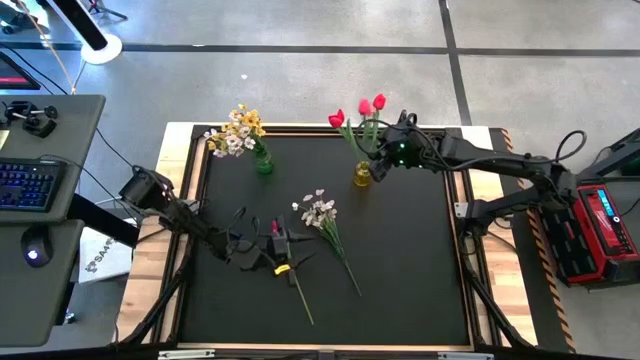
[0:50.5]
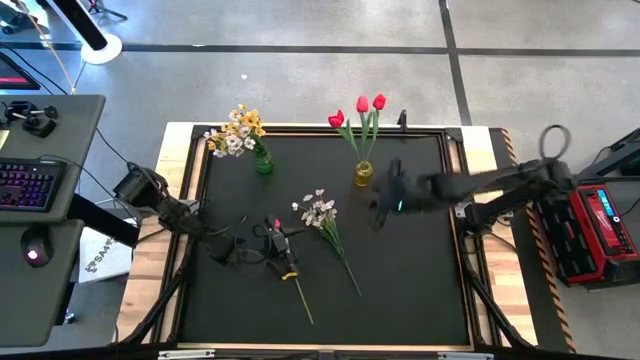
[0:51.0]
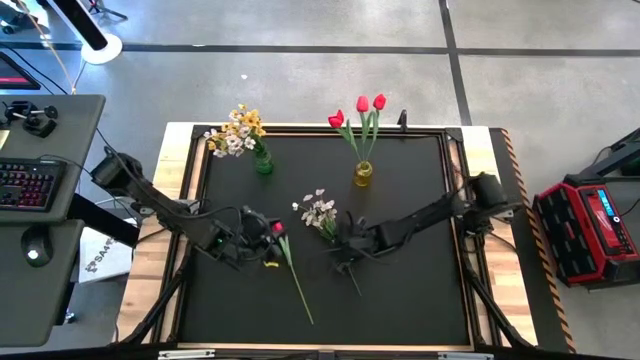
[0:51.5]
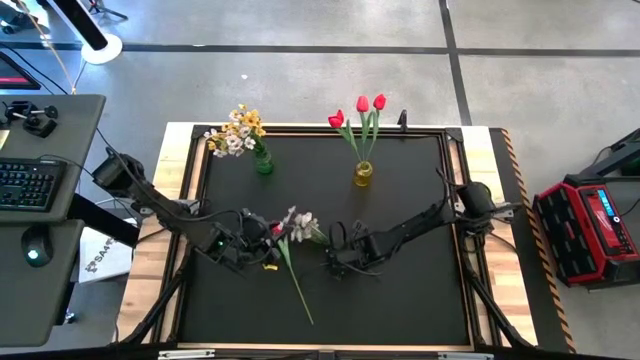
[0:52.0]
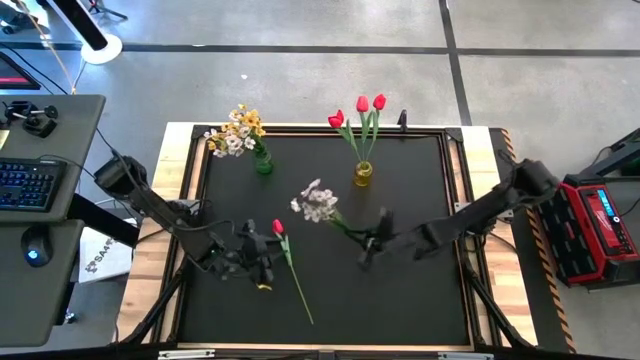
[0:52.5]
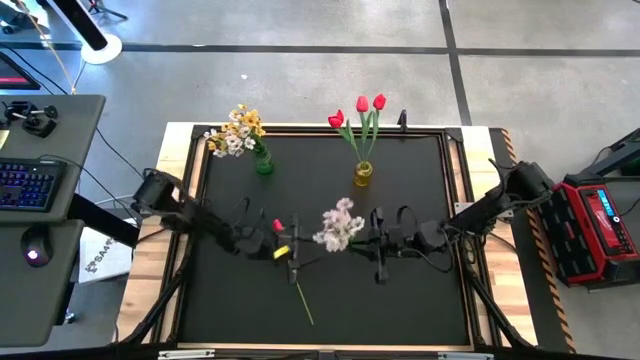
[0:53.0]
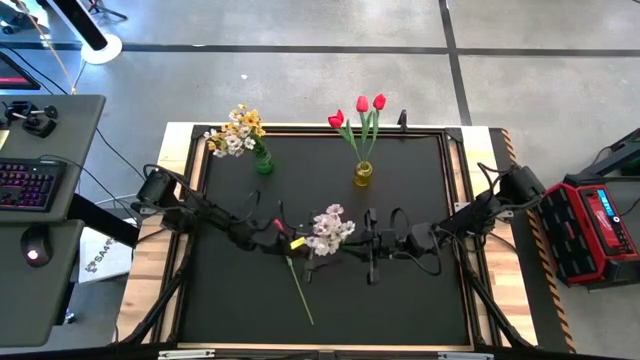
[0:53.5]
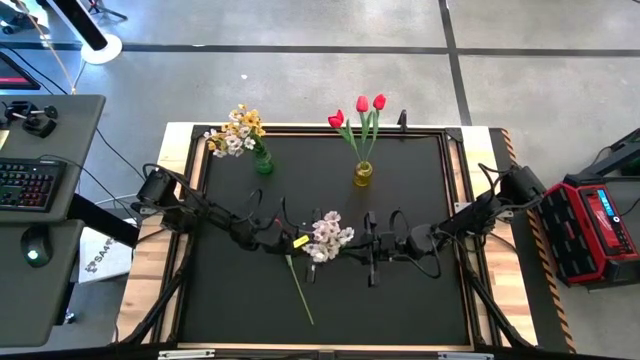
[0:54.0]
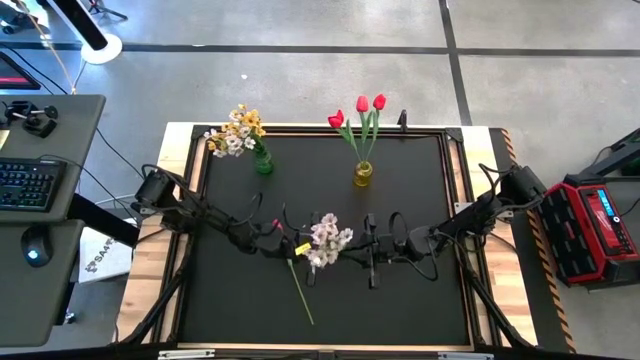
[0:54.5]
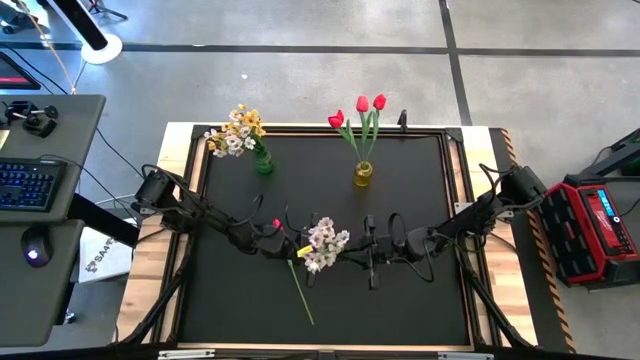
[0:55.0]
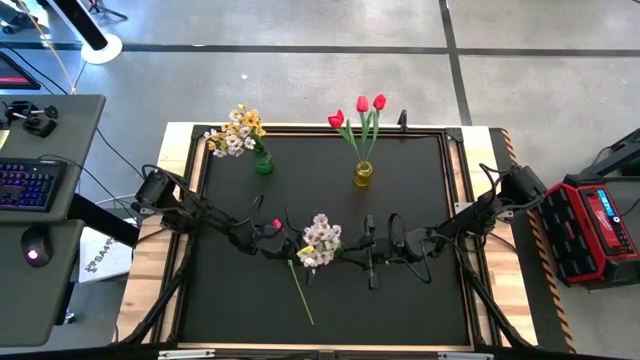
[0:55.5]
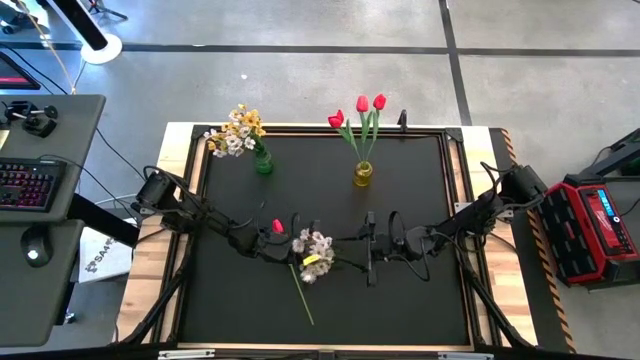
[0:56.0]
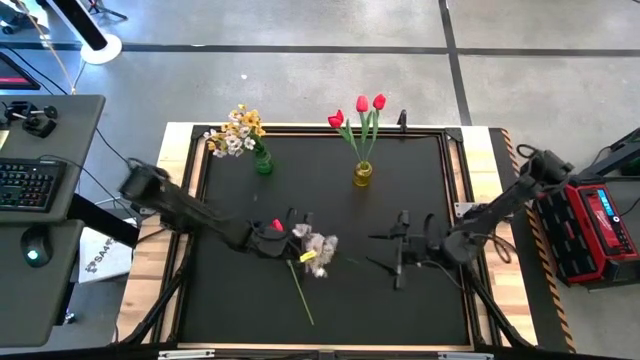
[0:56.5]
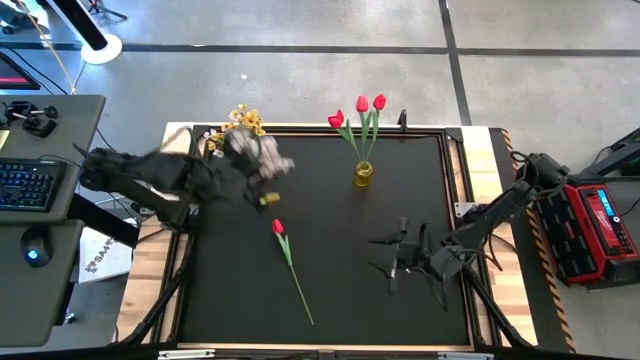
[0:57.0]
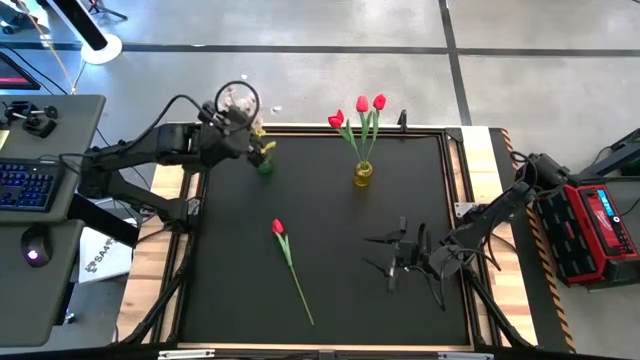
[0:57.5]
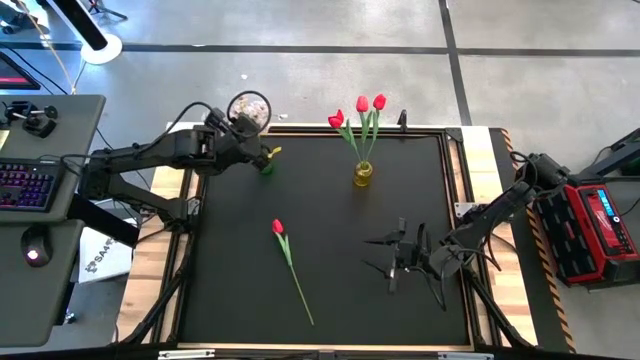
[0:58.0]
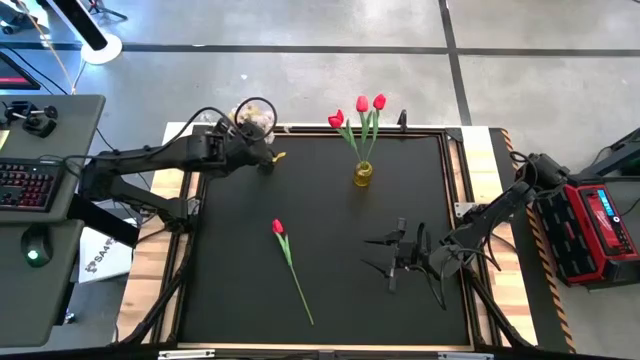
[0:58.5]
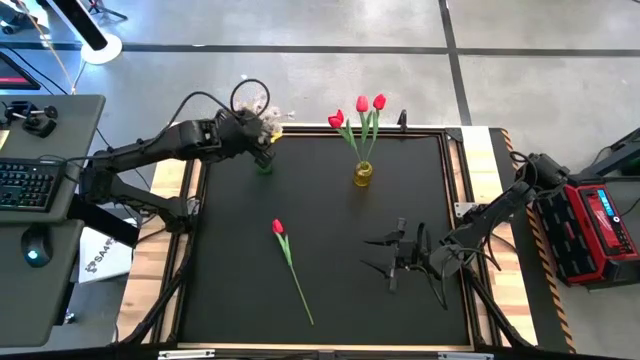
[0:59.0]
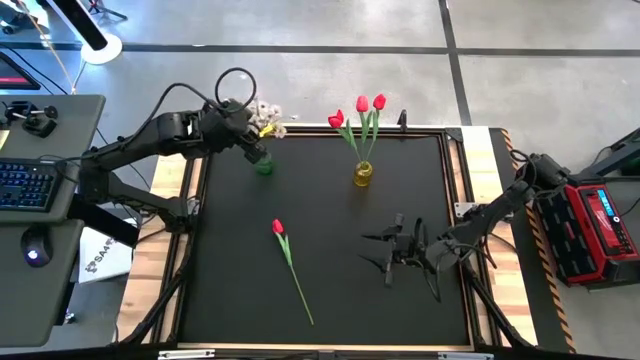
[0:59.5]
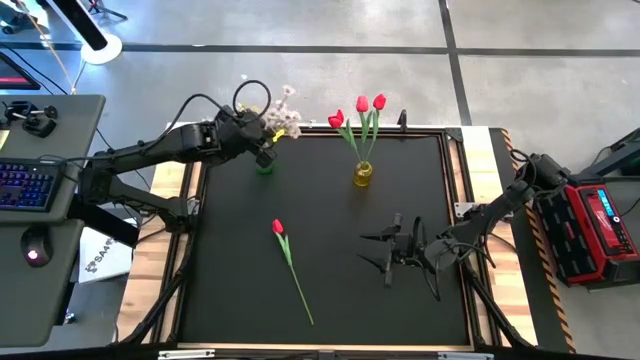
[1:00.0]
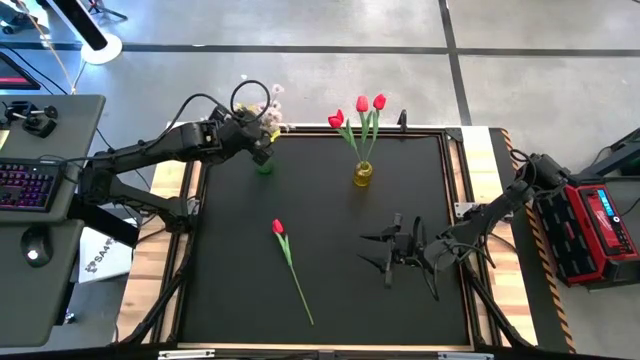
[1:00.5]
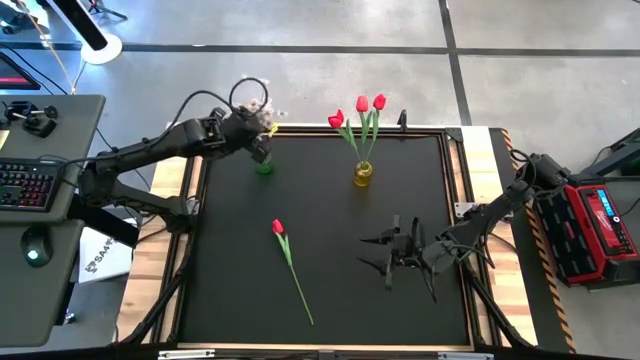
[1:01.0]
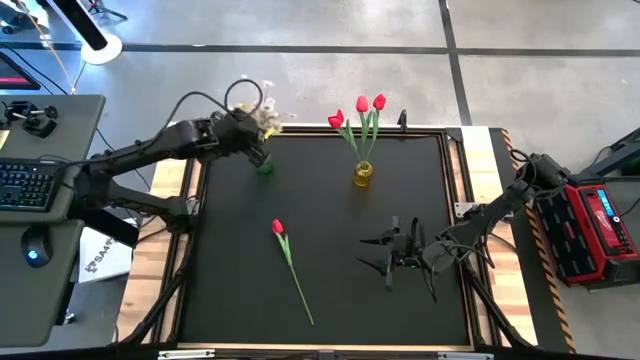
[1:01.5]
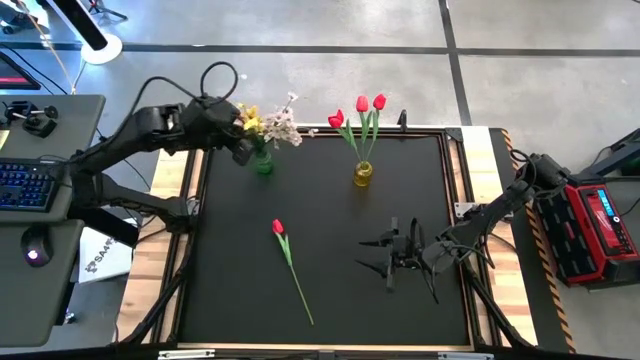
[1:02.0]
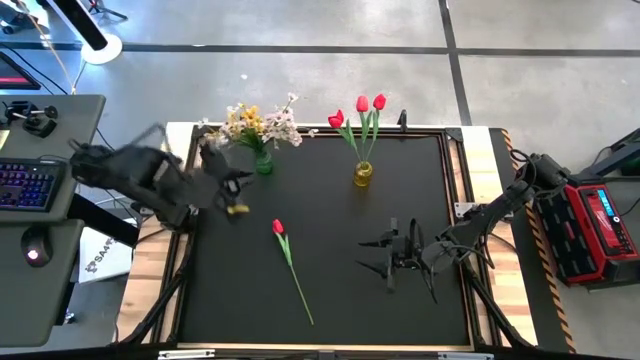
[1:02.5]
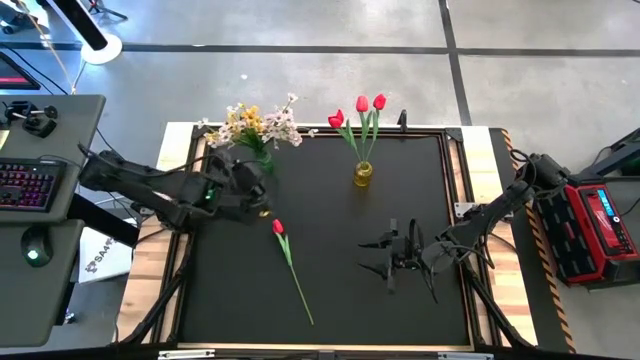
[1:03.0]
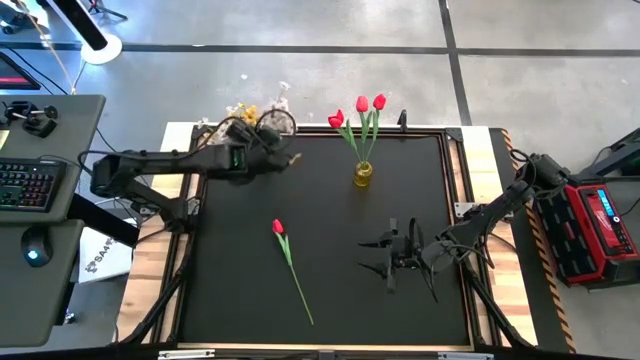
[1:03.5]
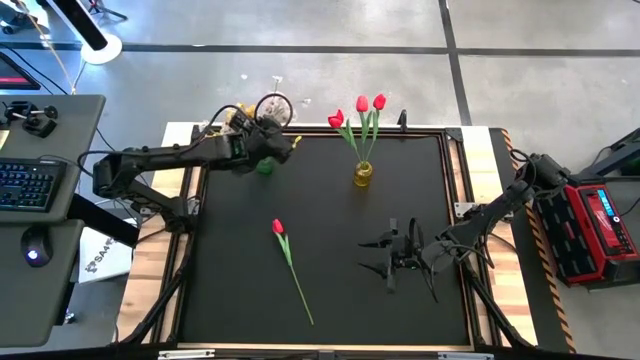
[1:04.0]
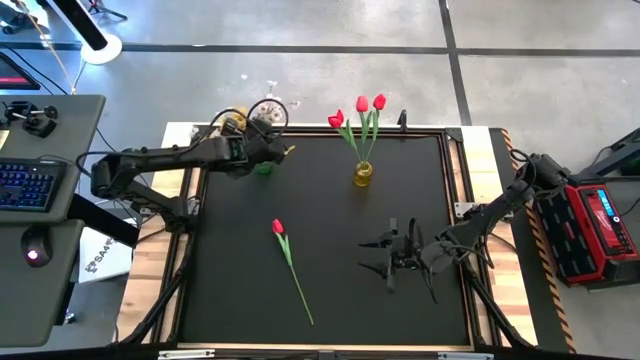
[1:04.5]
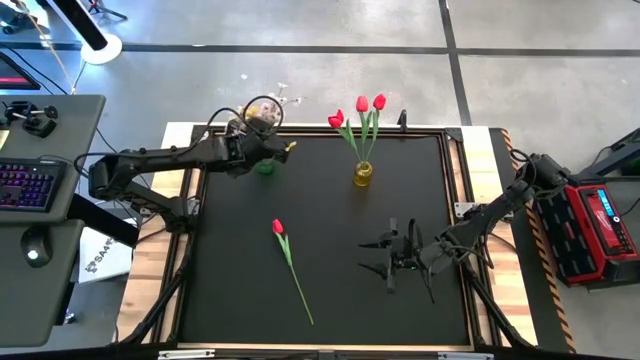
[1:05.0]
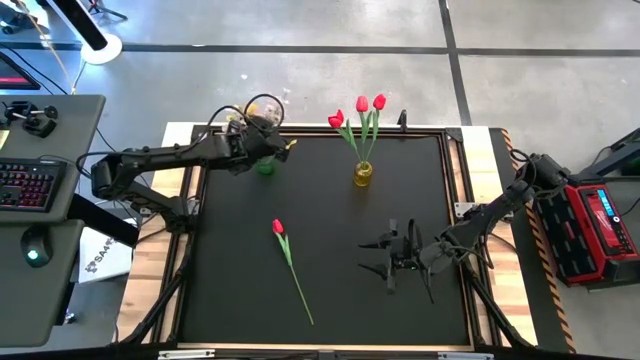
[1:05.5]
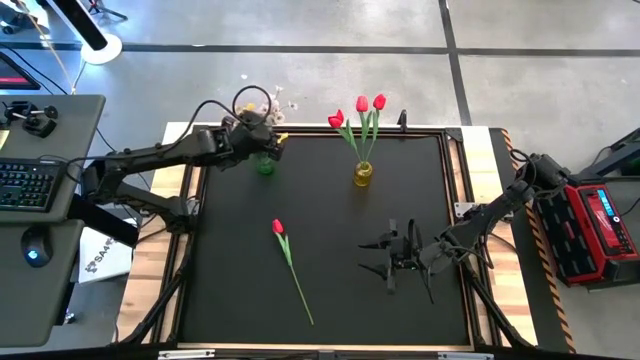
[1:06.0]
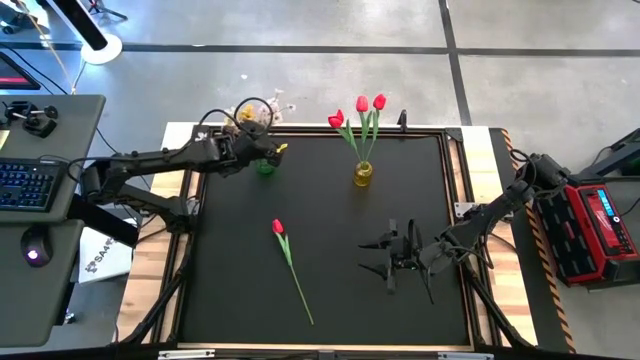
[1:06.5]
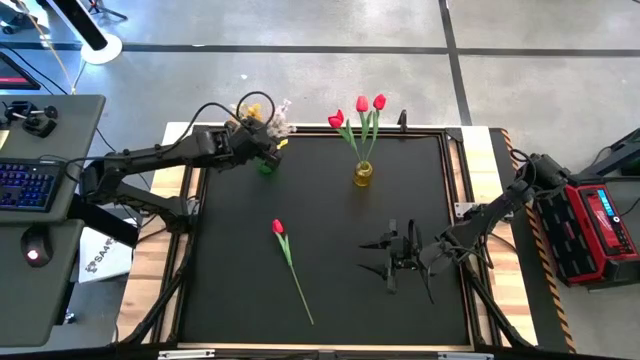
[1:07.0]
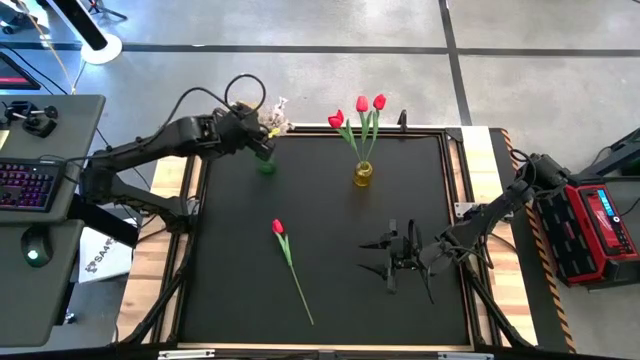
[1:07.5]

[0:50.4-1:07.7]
Task: Sort flowers into vase by color
Put the white flowers into the green vase

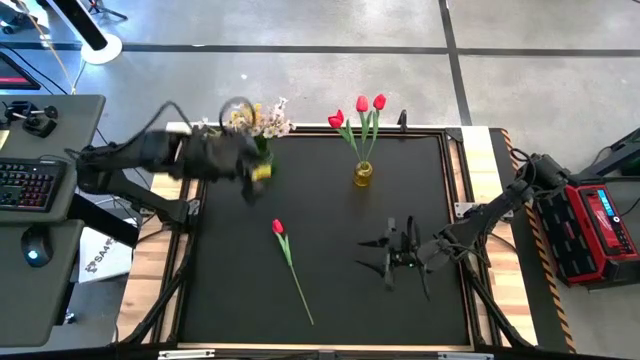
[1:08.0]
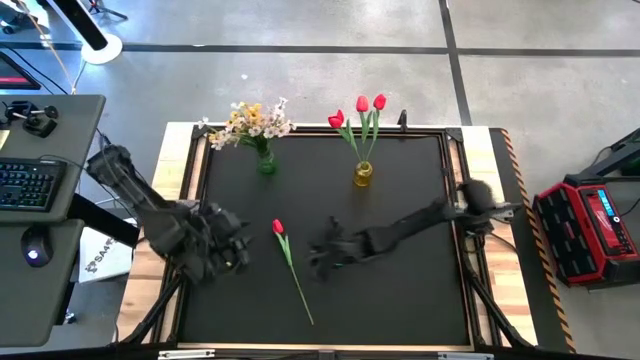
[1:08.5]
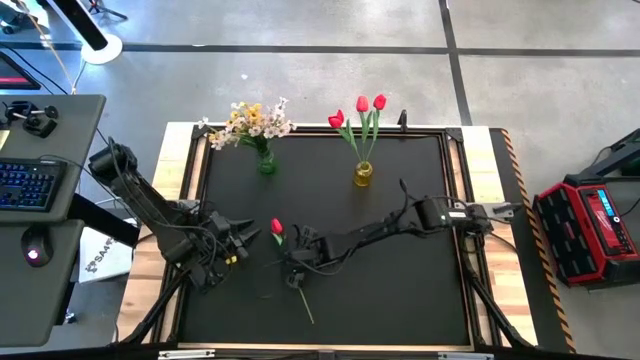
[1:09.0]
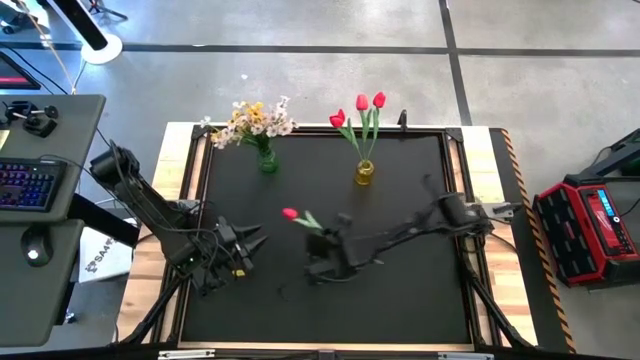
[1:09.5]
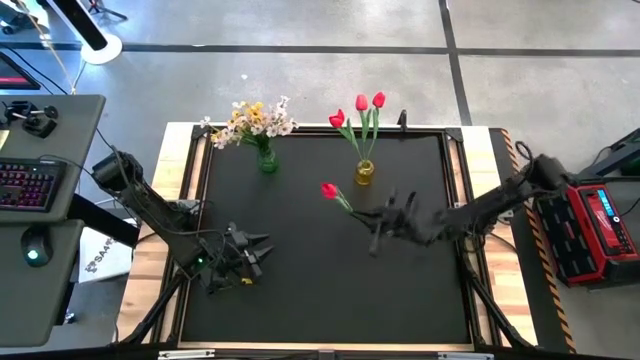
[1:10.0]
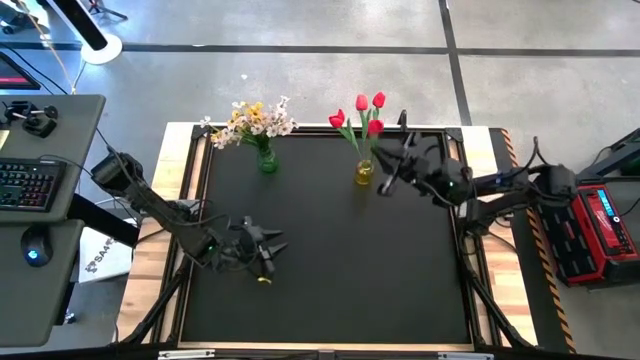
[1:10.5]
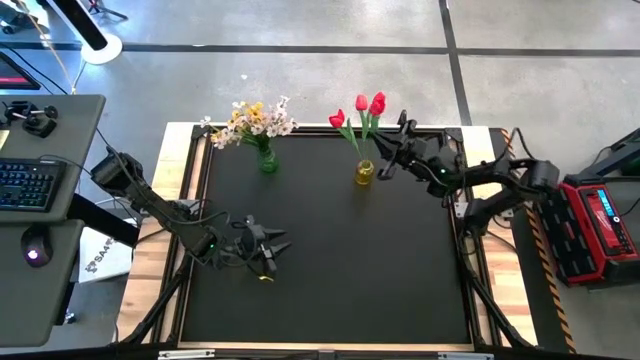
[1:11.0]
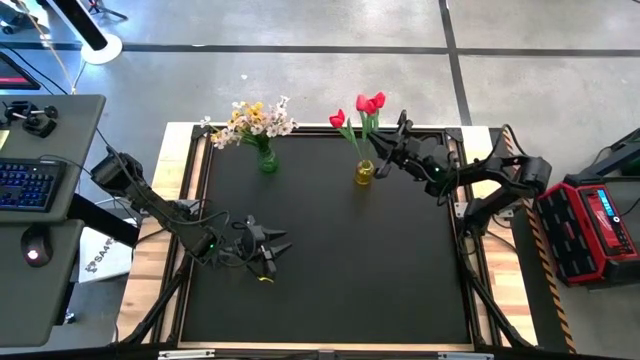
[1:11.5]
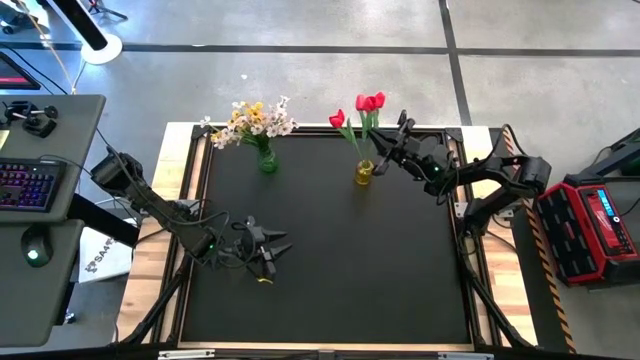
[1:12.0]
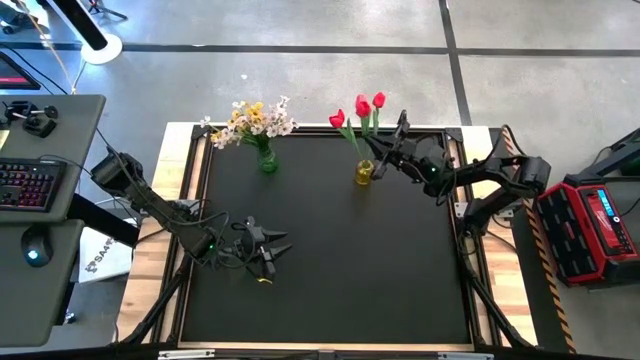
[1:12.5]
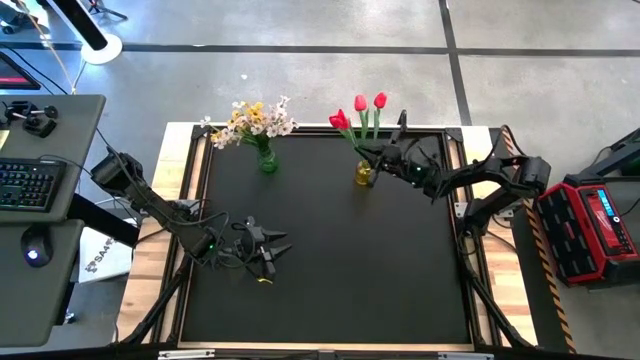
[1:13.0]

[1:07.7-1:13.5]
Put the red flower into the yellow vase
